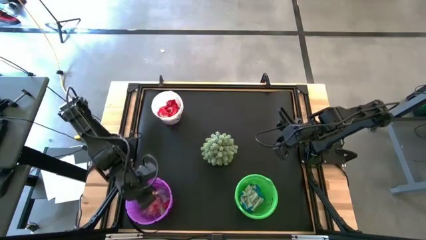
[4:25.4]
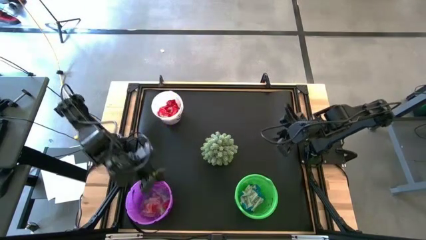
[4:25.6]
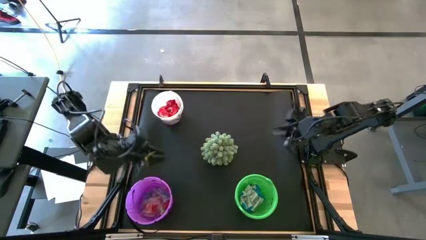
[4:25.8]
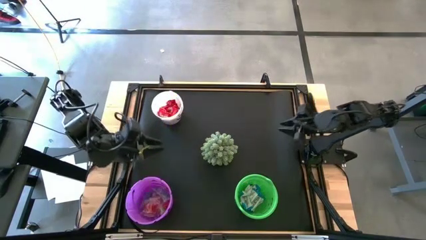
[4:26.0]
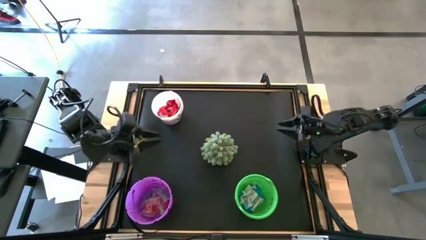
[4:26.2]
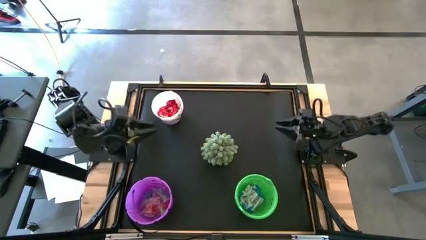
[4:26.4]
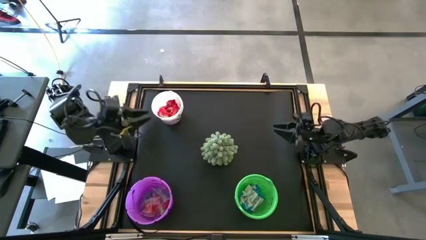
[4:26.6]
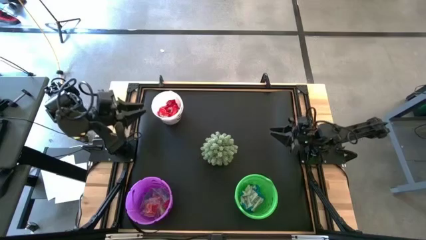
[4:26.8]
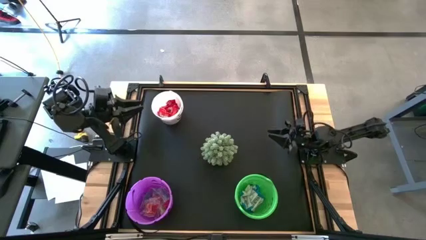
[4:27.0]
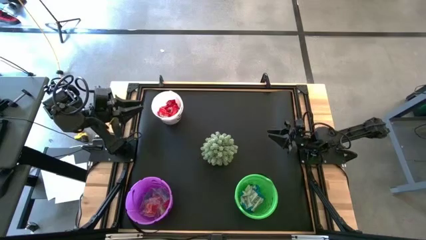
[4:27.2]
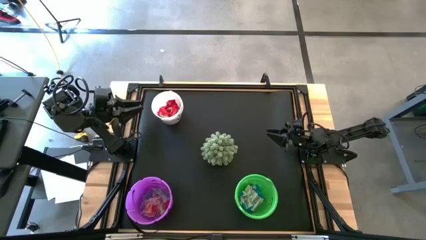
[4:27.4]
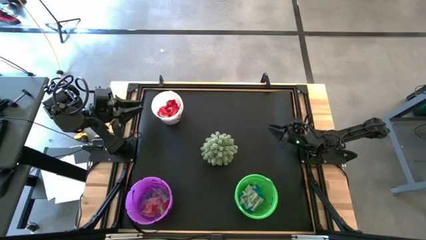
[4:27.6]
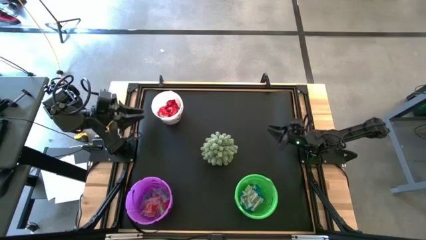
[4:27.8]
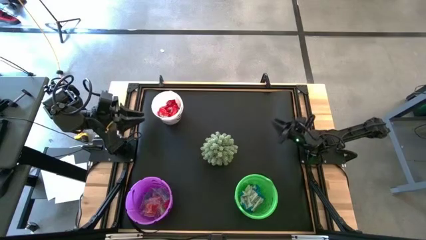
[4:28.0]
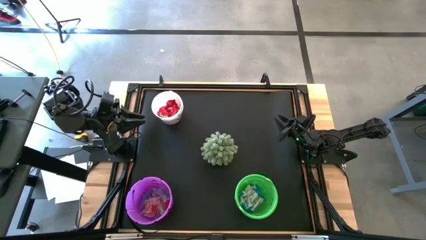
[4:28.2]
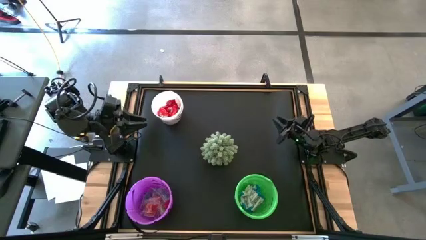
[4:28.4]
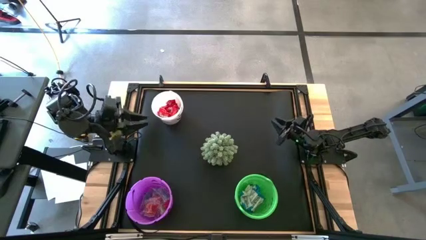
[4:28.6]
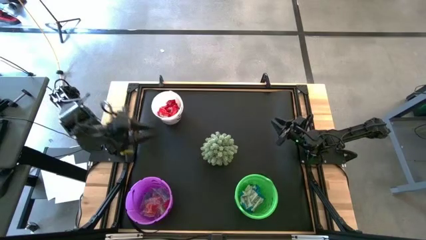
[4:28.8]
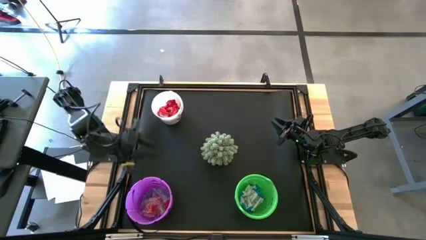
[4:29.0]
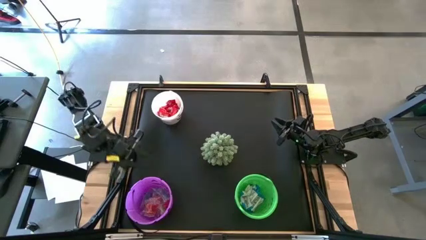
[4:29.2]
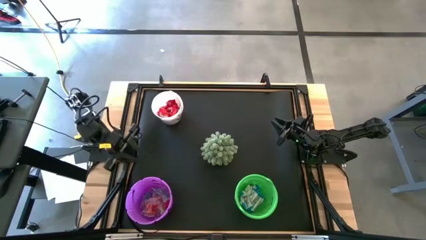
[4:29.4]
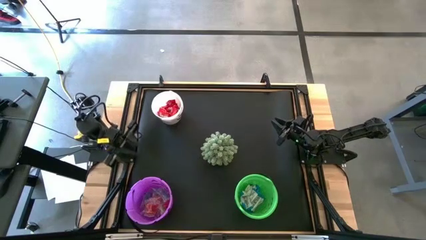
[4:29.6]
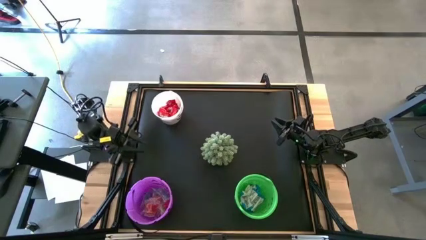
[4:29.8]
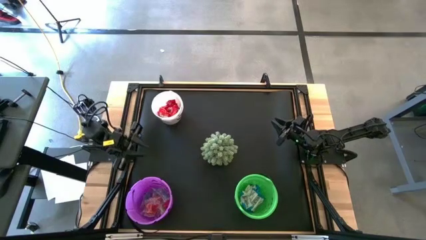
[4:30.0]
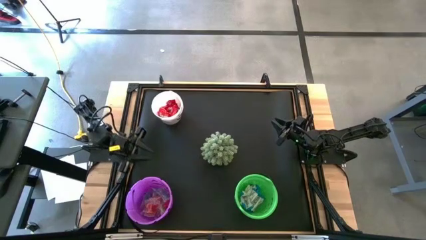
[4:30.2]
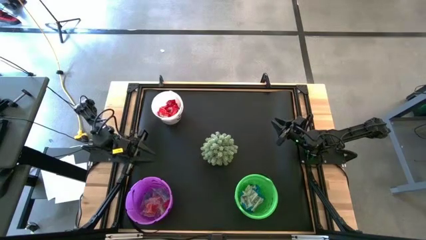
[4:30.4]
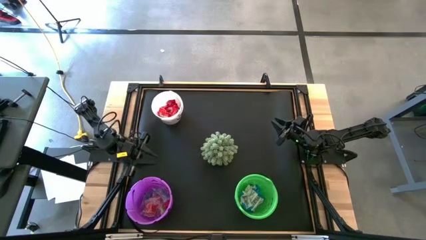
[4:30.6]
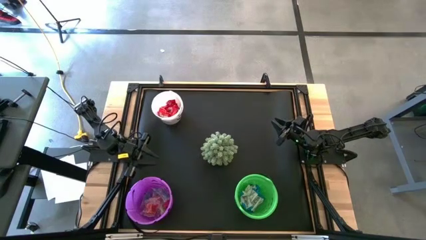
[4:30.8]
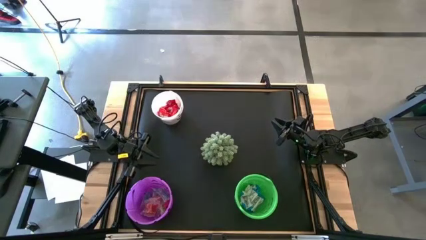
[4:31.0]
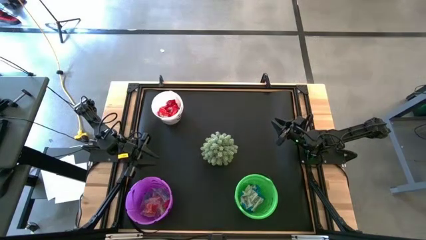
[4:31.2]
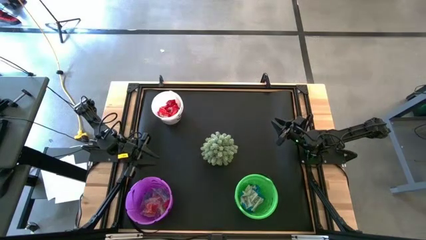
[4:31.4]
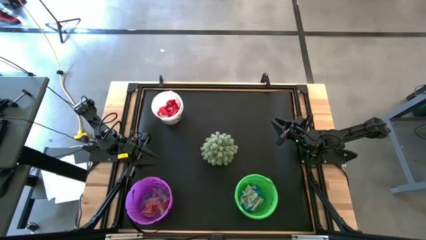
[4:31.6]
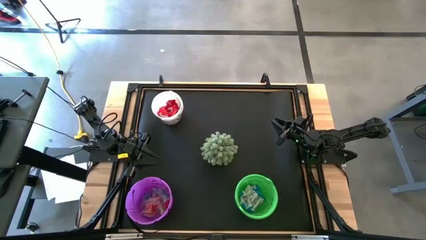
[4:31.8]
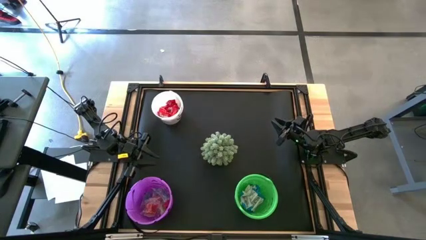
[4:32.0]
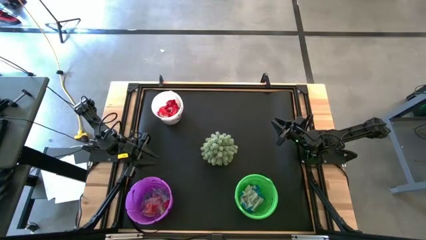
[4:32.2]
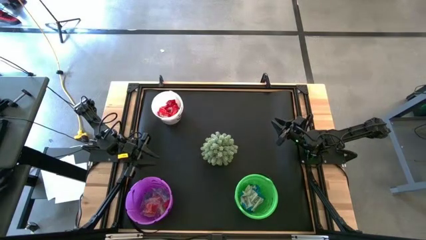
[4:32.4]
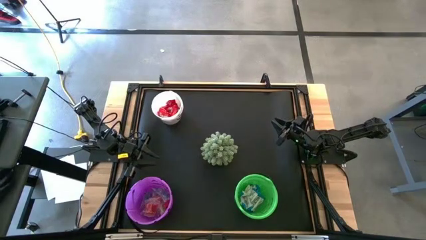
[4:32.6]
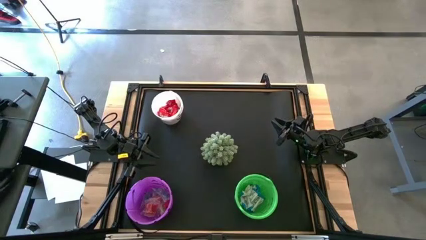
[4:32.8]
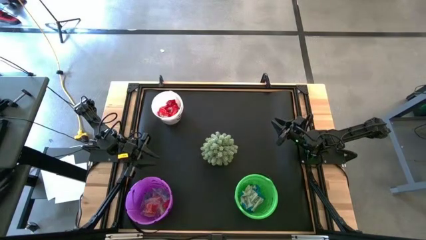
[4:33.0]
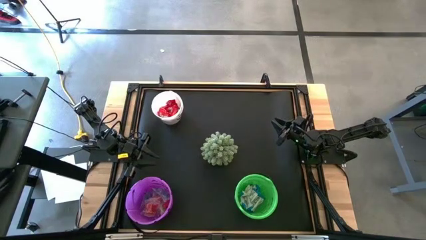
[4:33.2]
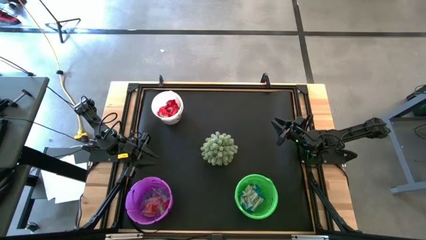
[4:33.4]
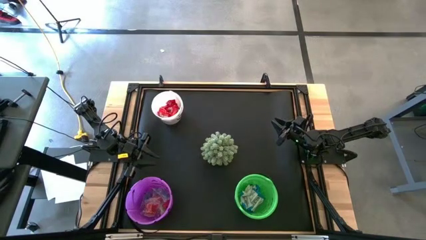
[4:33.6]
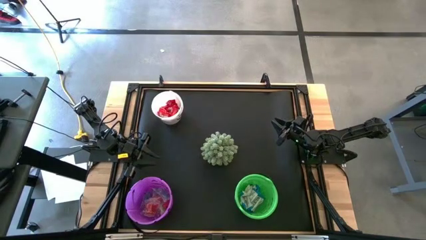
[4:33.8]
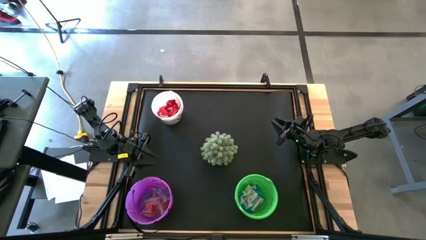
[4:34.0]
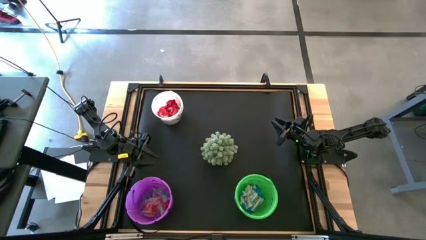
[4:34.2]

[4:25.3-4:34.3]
Task: Organize candy in baskets
Return to Home Position

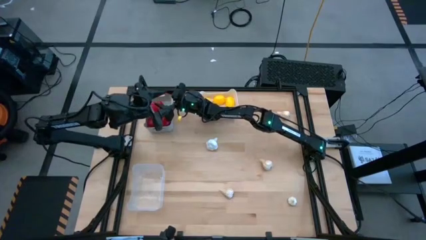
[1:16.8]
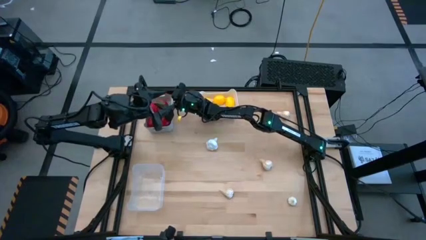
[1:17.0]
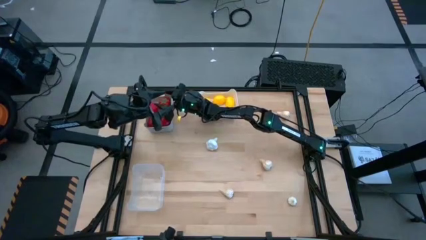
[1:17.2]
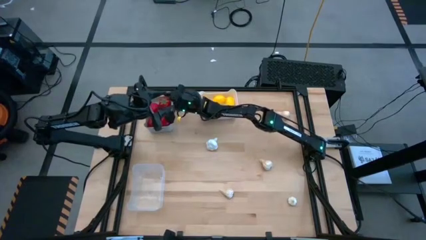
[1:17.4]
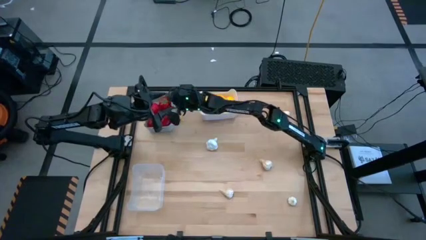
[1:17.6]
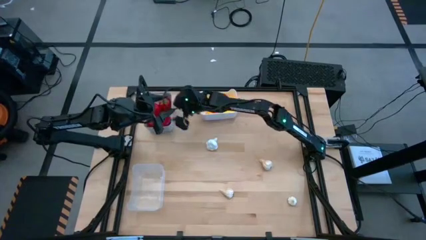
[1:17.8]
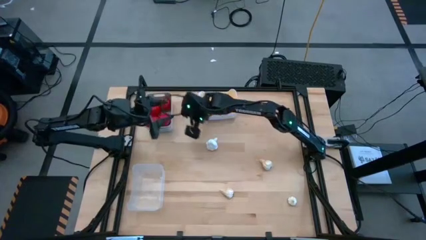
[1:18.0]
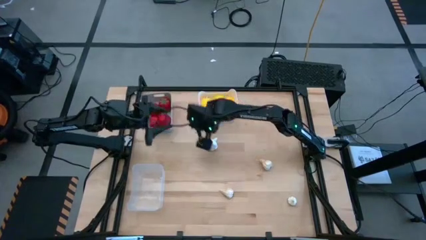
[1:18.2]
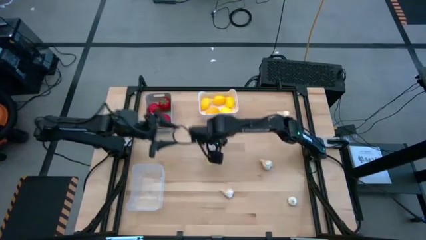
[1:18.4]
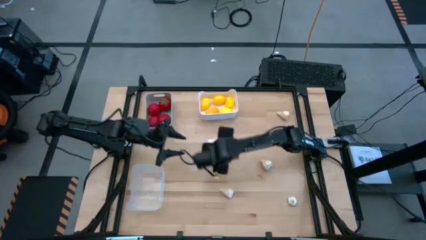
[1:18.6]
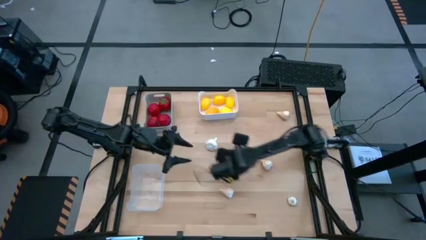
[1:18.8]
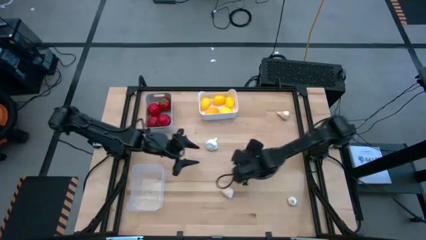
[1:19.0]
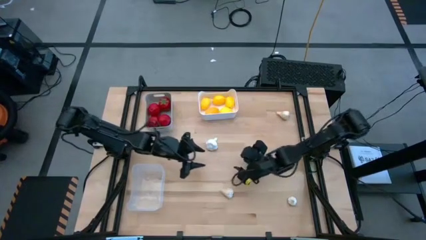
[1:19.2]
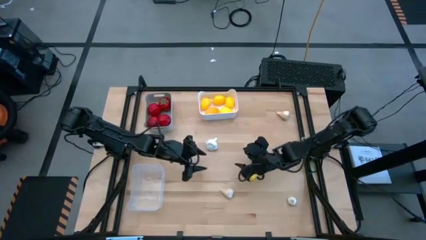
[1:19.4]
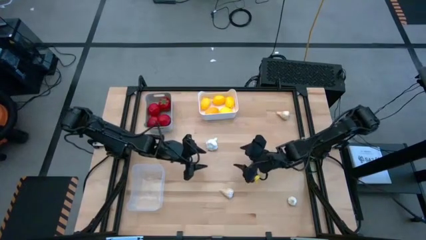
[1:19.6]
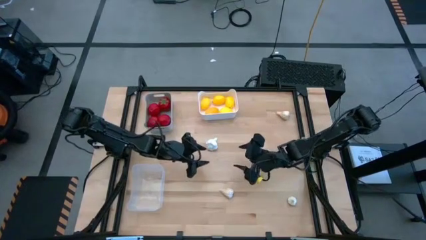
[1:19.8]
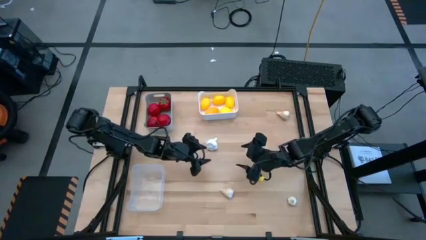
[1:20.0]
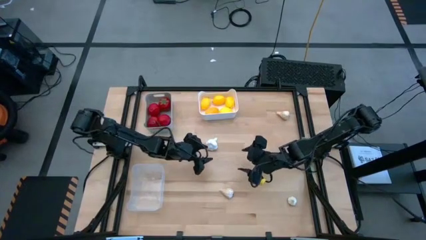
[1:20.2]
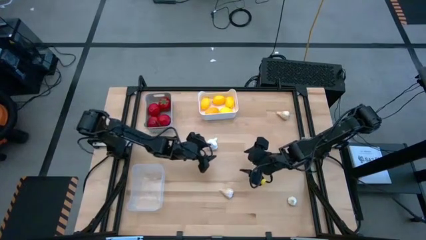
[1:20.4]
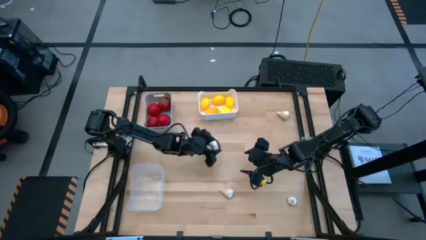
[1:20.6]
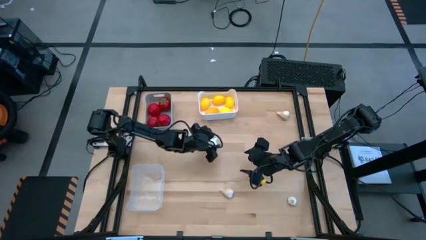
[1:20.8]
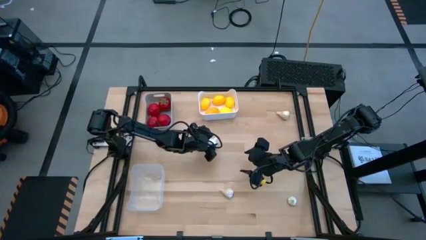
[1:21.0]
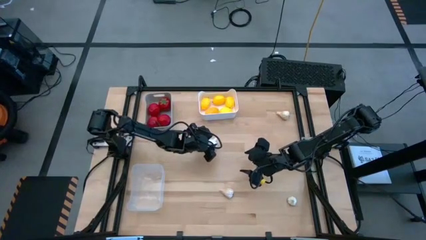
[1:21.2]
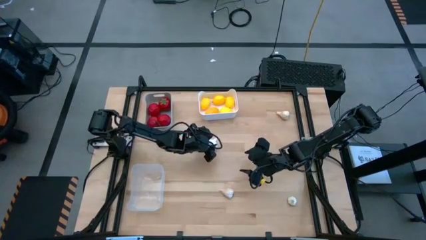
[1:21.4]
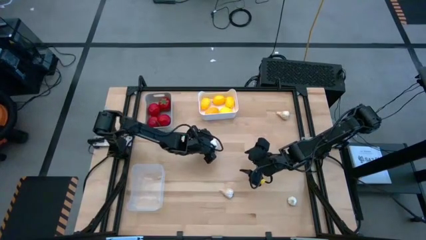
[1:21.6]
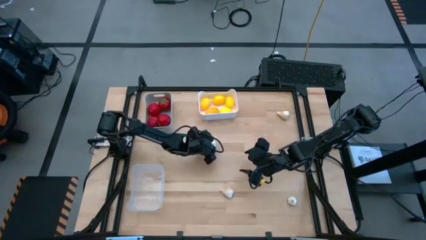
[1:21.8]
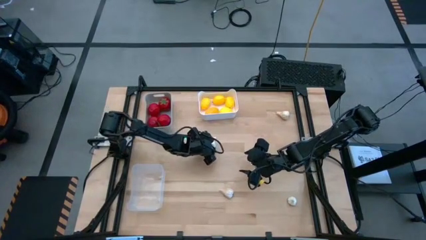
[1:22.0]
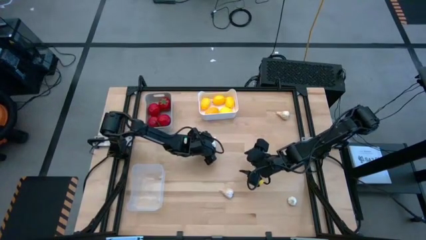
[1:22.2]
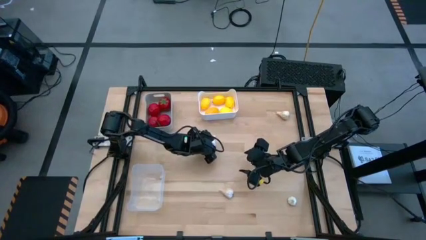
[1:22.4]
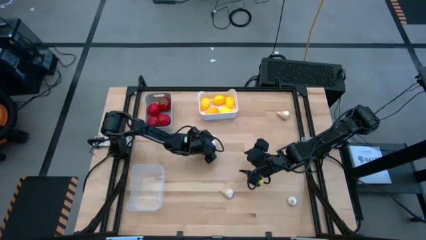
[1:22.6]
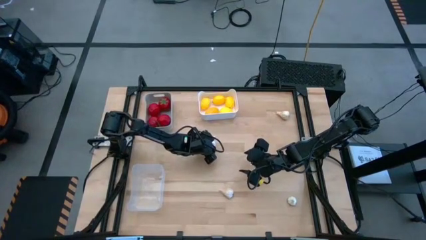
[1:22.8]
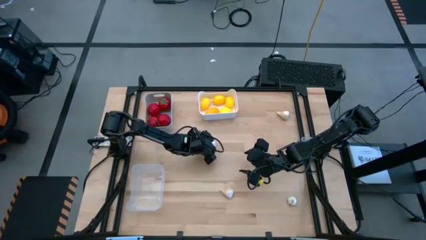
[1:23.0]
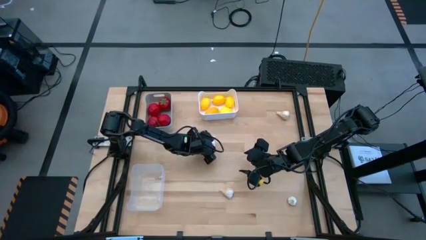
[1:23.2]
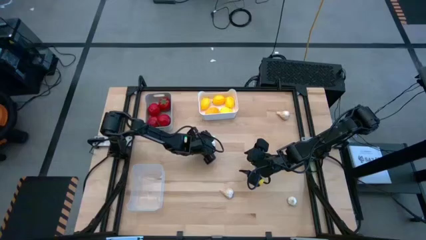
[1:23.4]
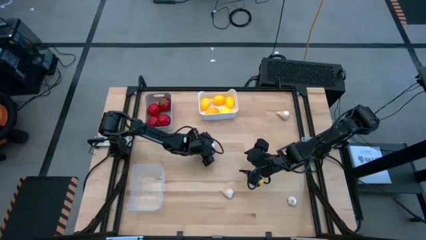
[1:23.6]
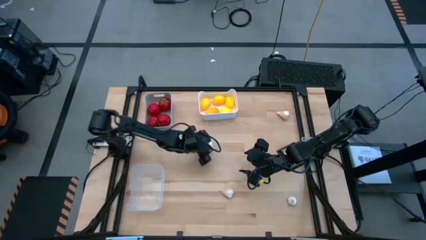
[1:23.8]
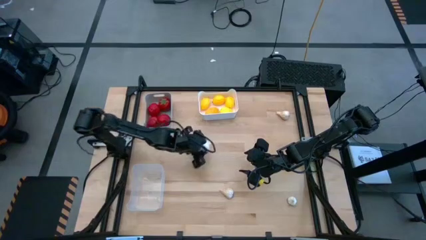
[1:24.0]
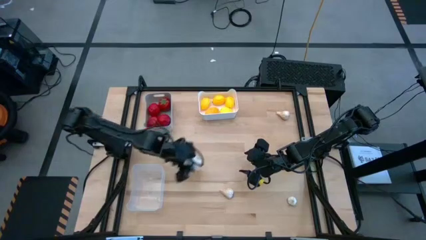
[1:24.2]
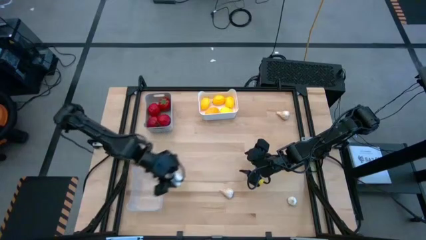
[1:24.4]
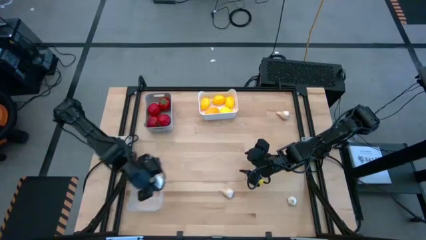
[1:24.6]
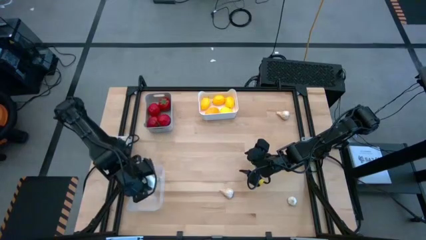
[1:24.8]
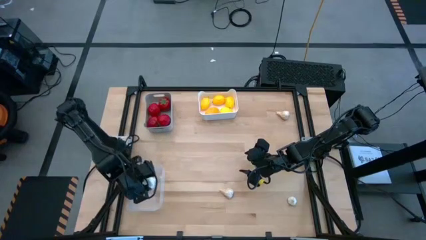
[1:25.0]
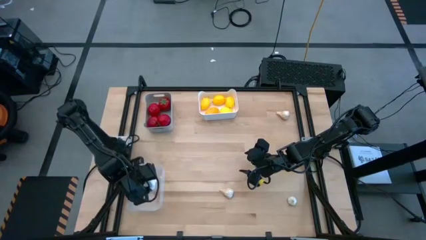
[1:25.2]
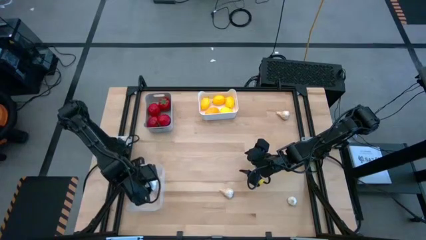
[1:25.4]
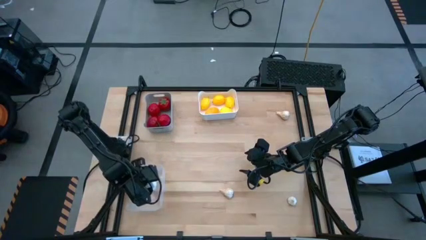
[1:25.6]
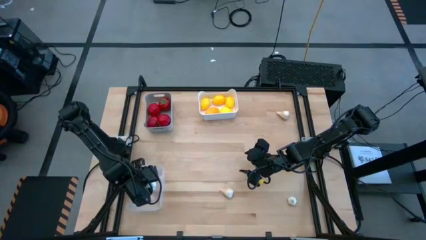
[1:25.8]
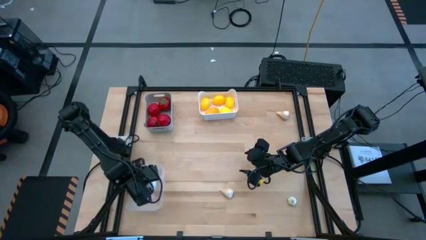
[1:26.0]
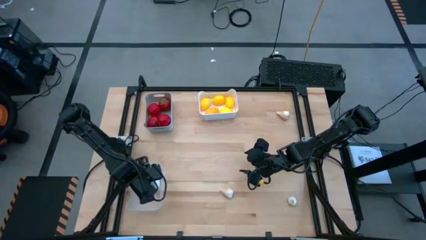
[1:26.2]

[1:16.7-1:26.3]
Task: Sort produce into baskets
Put the garlic into the transparent bin
